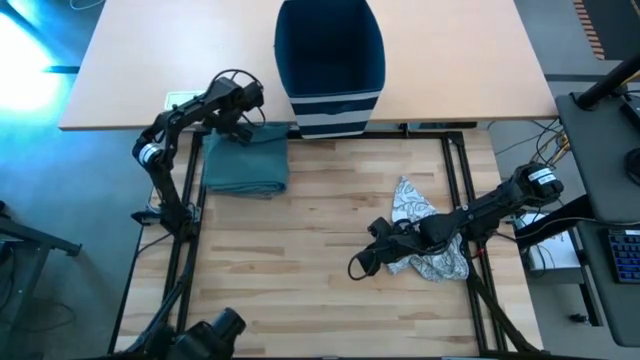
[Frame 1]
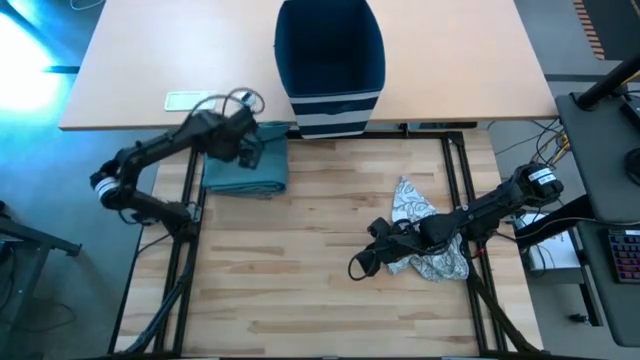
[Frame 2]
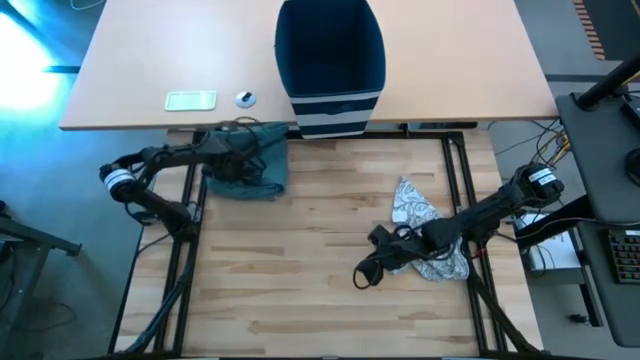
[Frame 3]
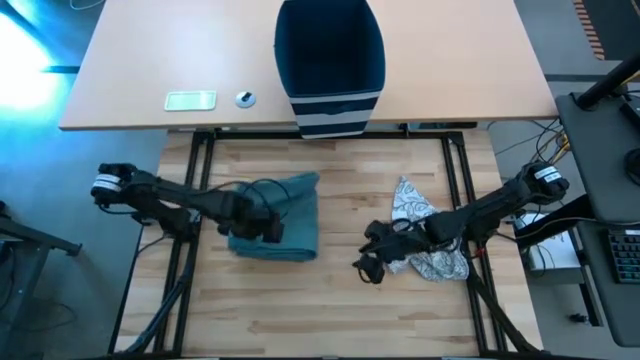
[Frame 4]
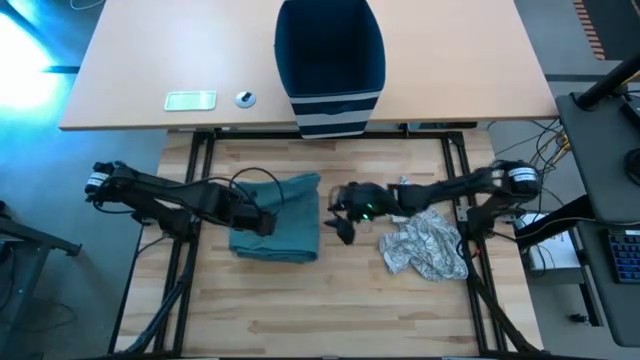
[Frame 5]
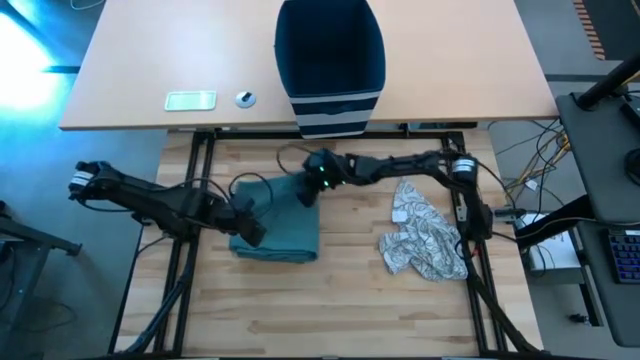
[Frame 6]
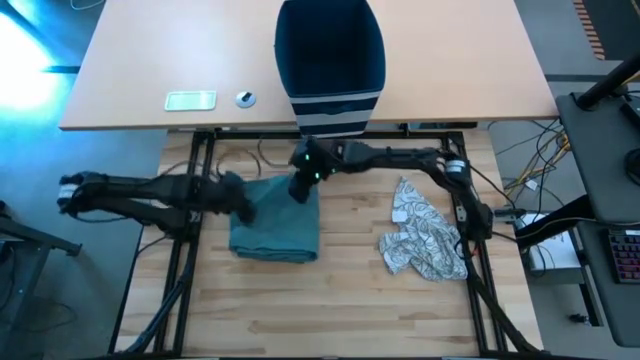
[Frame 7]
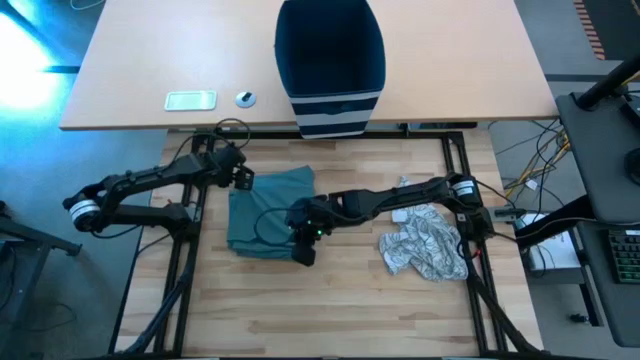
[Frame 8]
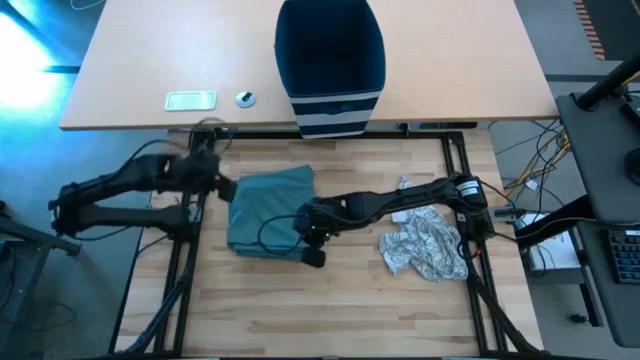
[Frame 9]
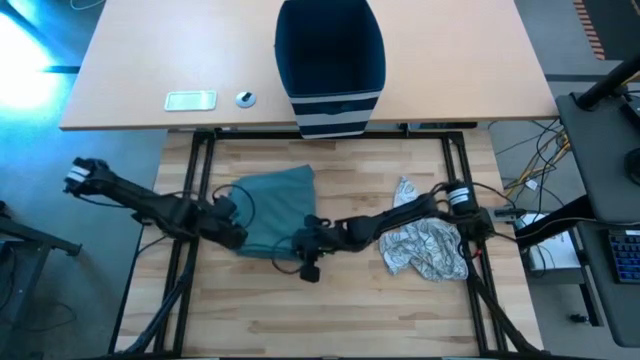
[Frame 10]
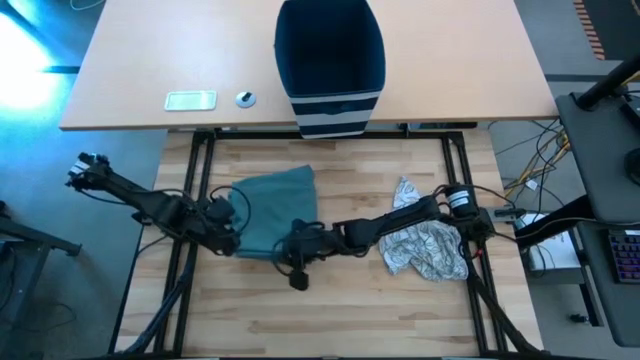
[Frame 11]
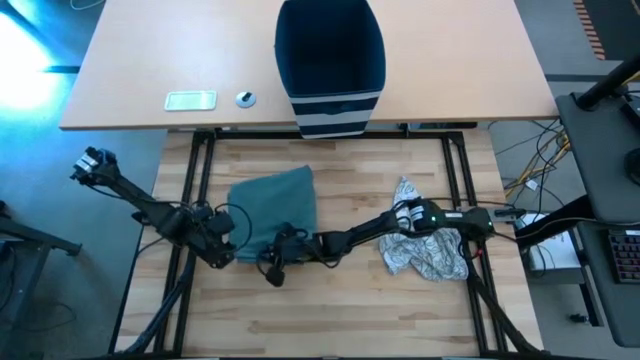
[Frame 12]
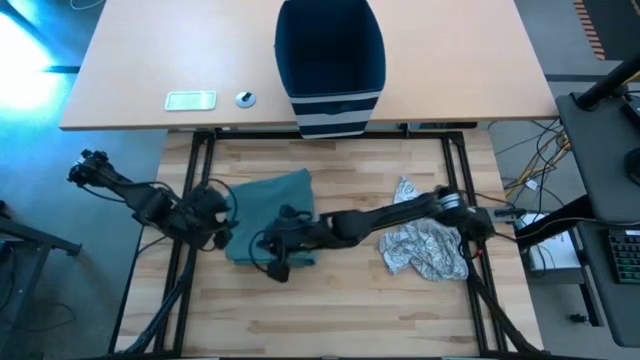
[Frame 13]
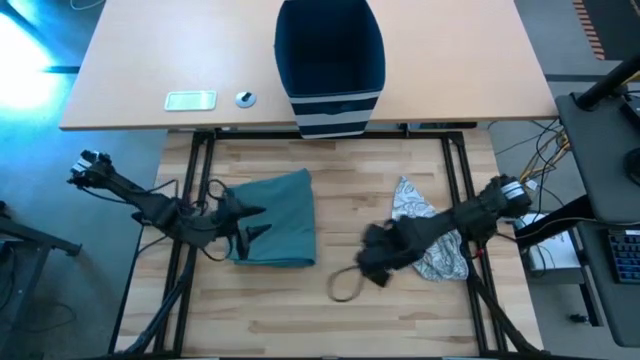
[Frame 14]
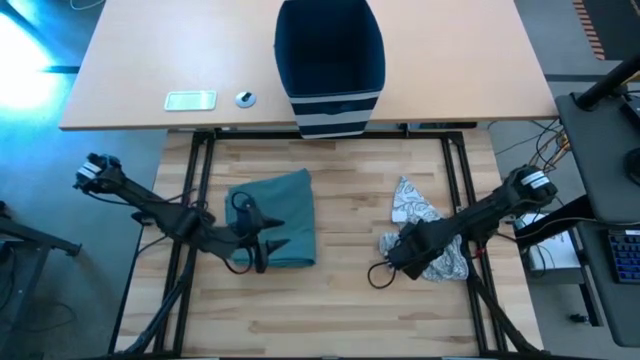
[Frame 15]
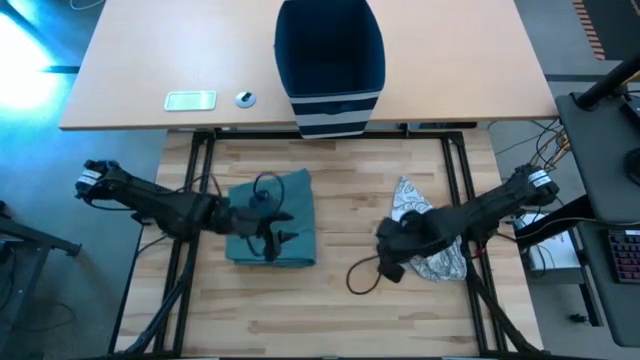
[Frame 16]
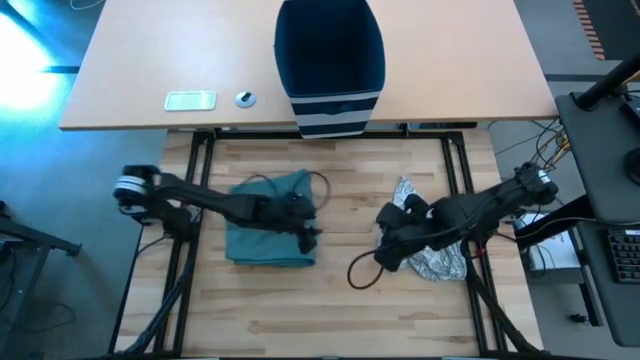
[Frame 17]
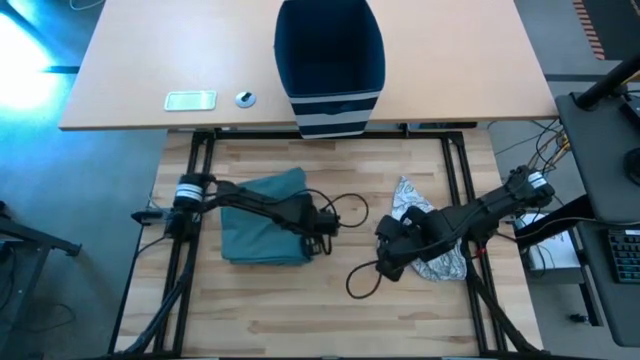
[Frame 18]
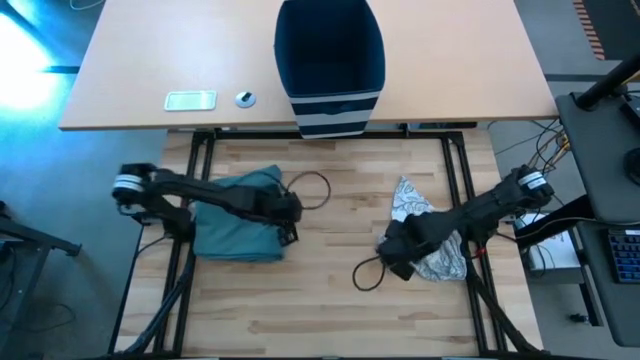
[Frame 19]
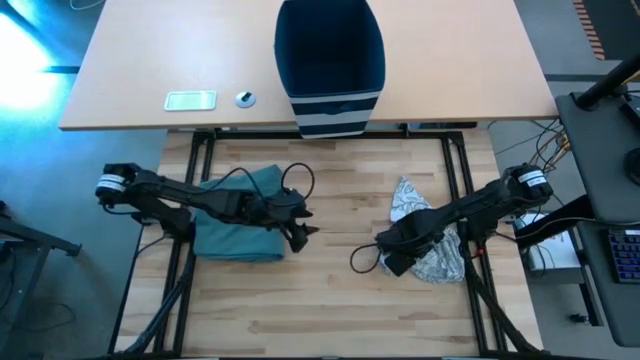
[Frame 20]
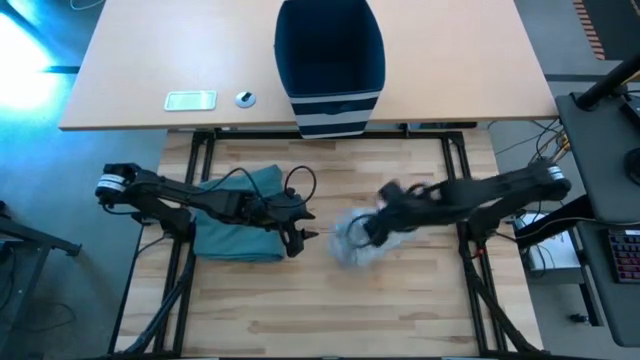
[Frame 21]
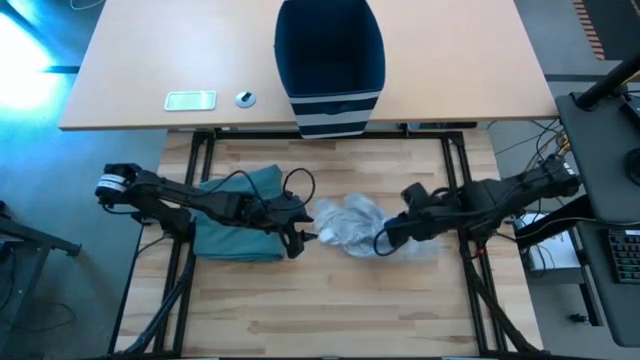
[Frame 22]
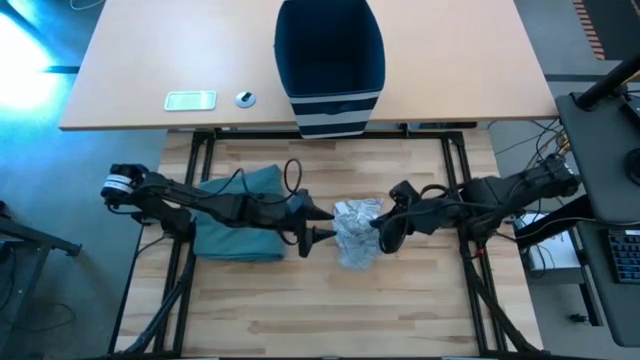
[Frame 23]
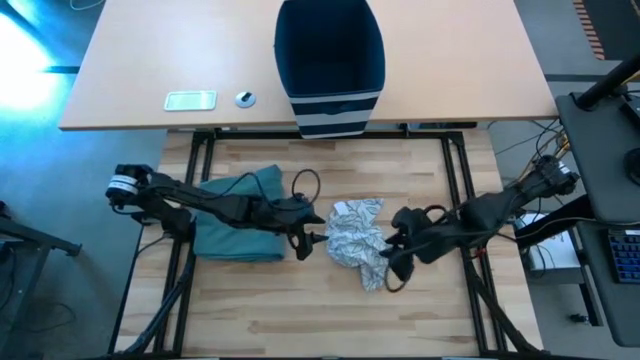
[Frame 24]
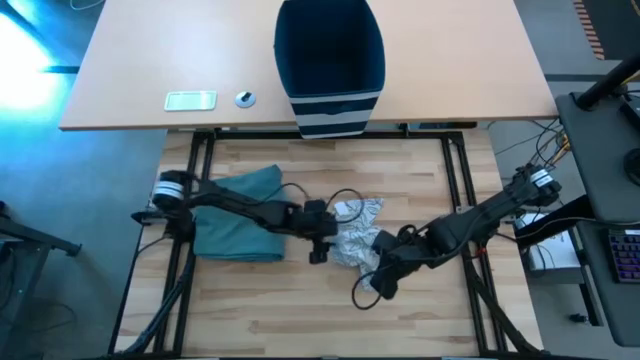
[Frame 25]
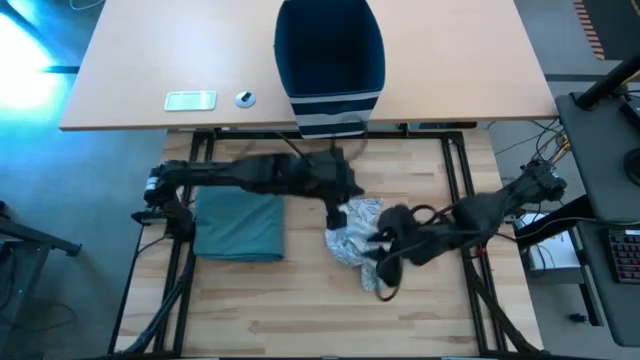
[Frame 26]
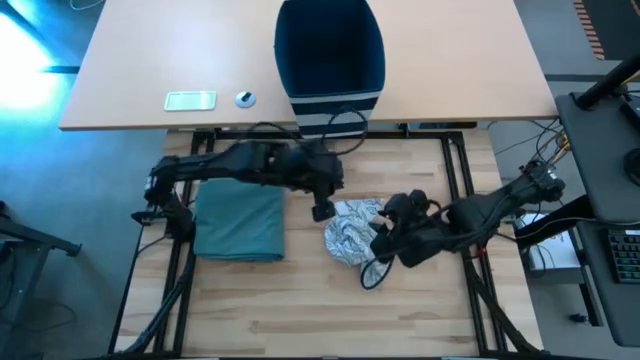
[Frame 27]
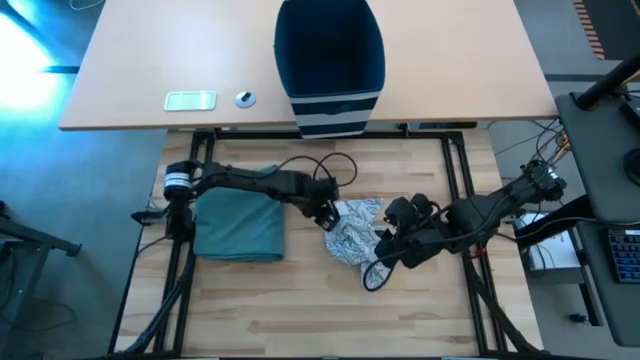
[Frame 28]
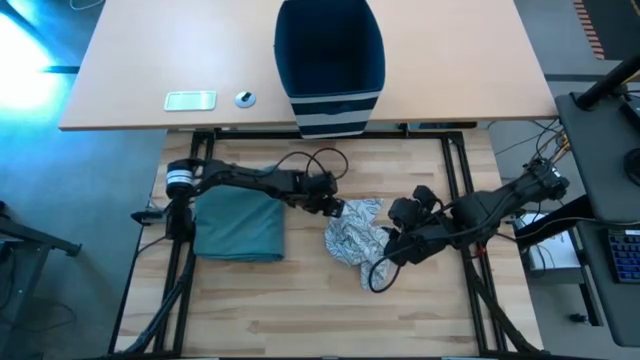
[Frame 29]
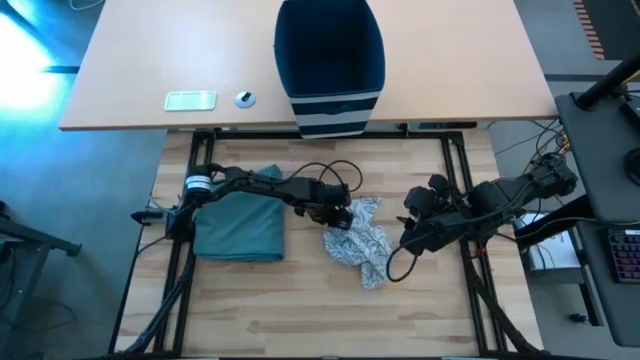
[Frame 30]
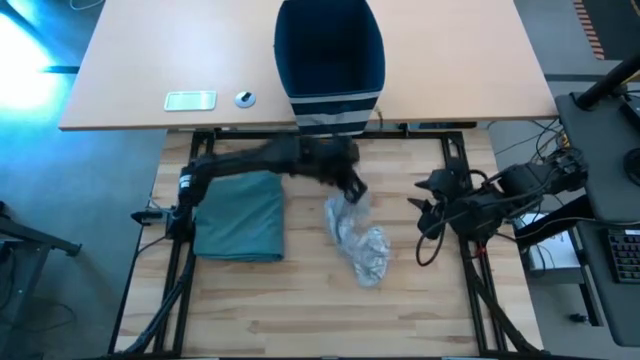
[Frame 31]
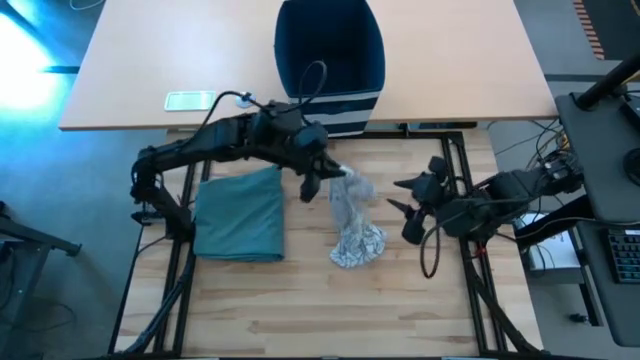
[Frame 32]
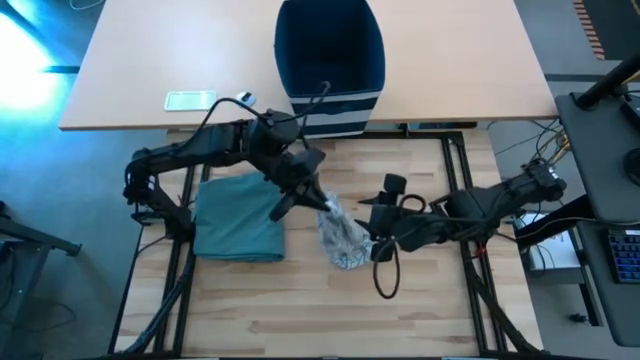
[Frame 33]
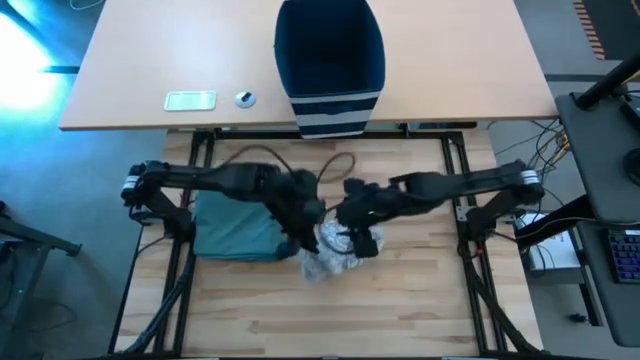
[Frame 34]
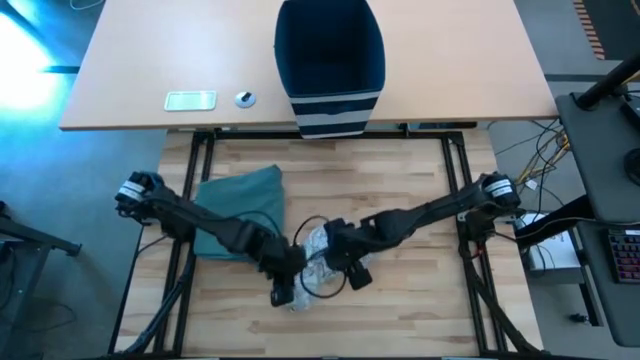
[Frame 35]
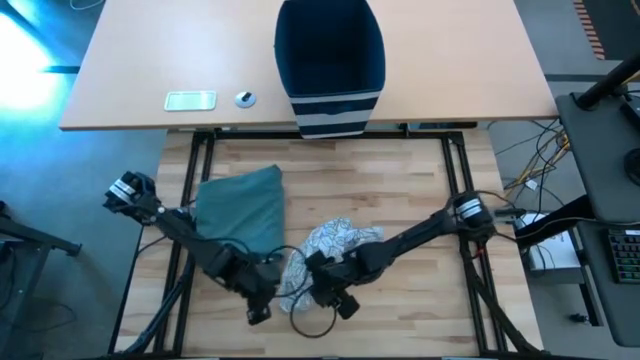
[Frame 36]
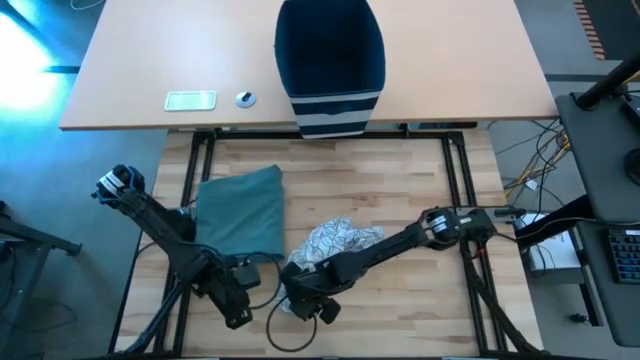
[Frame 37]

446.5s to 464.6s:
Task: Fold Laundry from Bin
Fold the white shirt

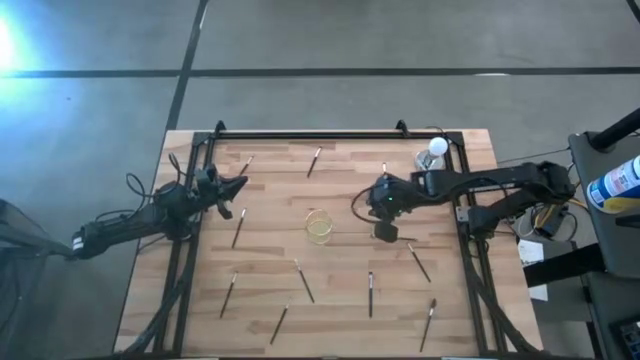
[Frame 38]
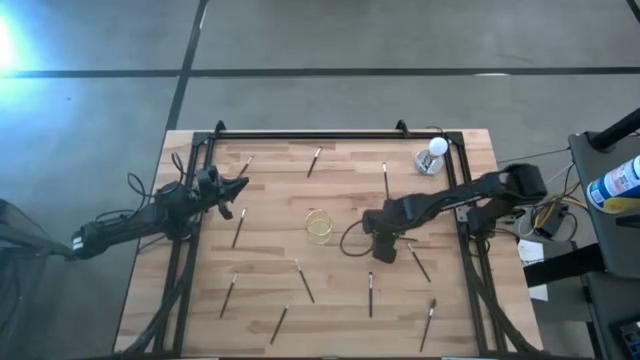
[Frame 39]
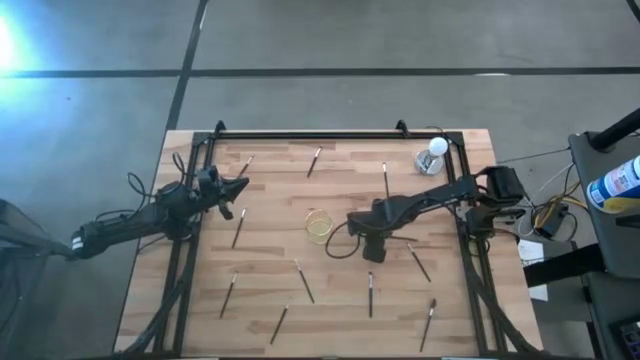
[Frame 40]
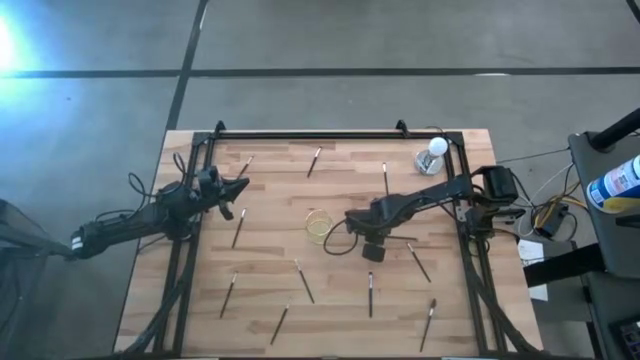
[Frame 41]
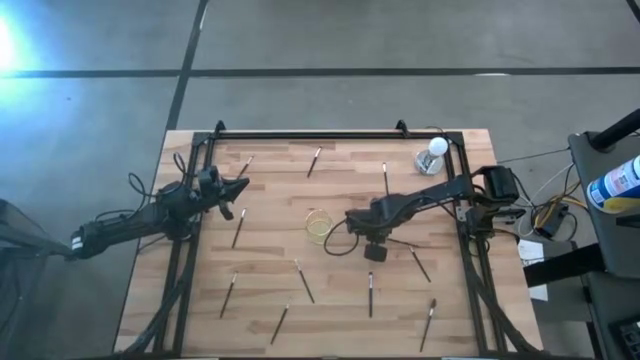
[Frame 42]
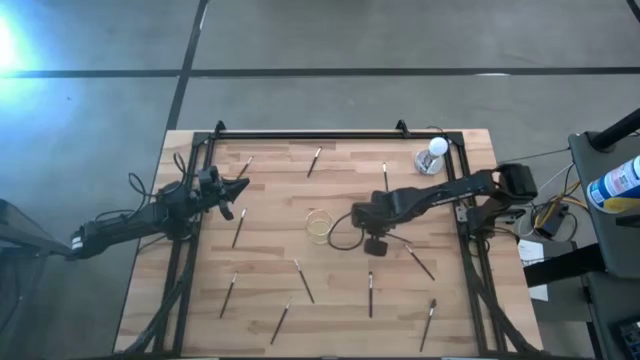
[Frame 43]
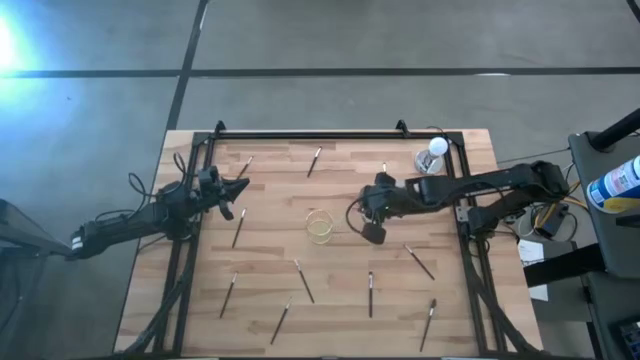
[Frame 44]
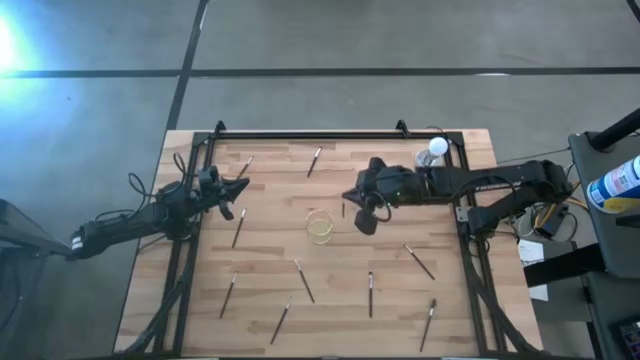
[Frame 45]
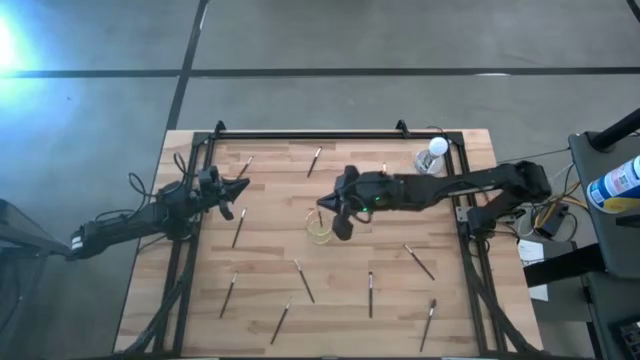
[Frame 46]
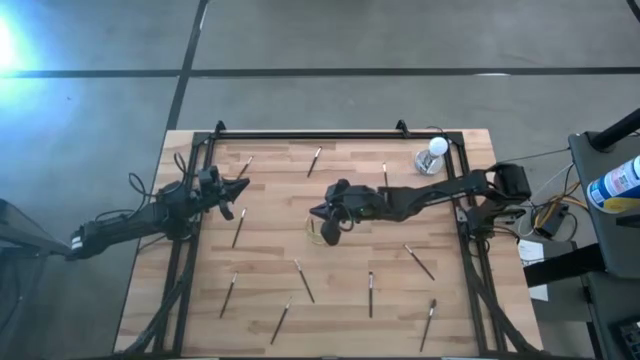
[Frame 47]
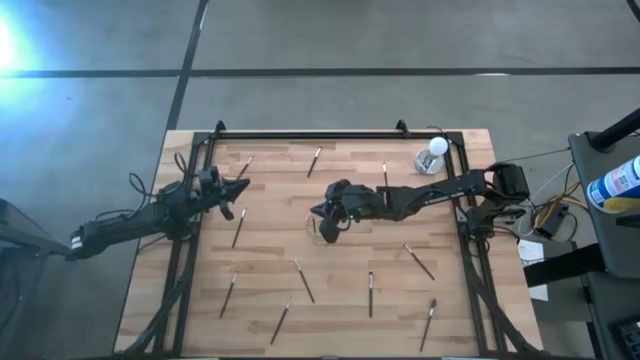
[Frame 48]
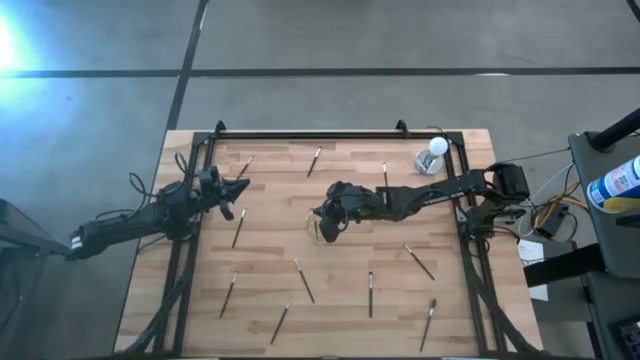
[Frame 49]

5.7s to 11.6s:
Task: Pick & Place Makeup Brushes
Put the eyeshadow brush into the gold makeup brush holder
